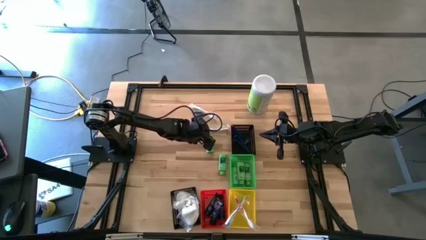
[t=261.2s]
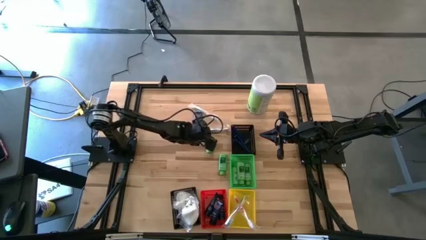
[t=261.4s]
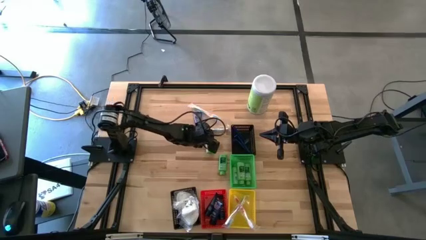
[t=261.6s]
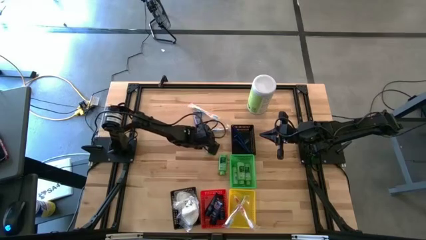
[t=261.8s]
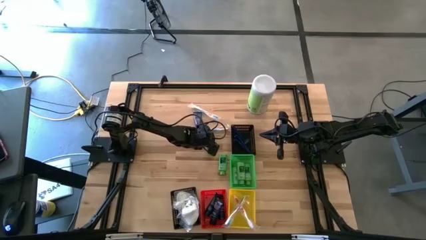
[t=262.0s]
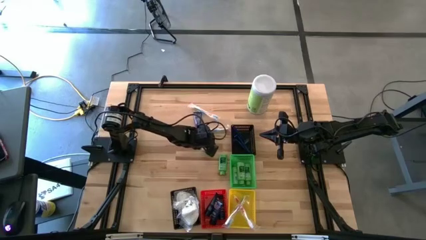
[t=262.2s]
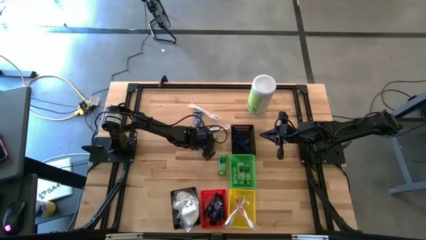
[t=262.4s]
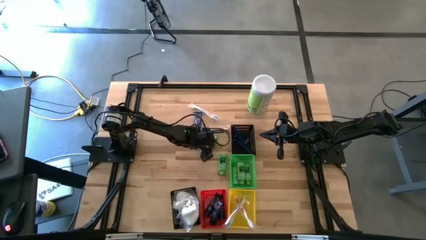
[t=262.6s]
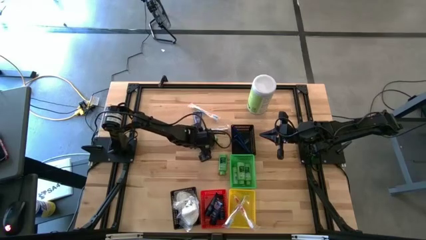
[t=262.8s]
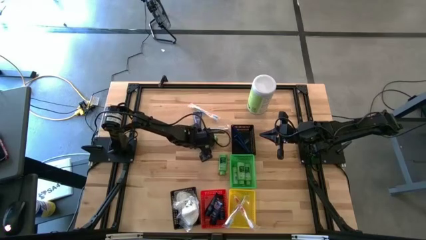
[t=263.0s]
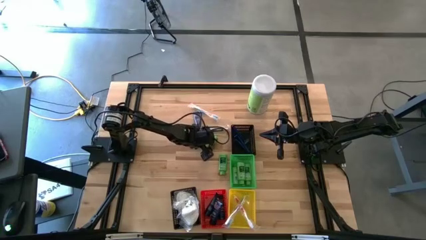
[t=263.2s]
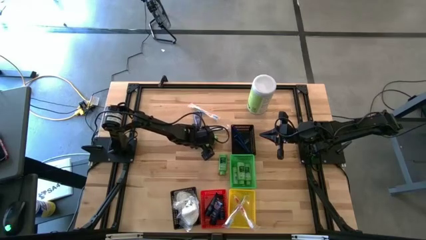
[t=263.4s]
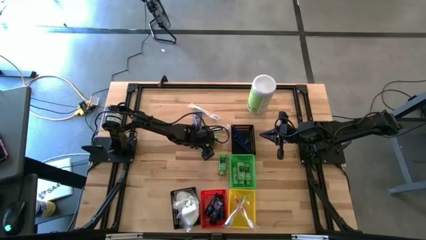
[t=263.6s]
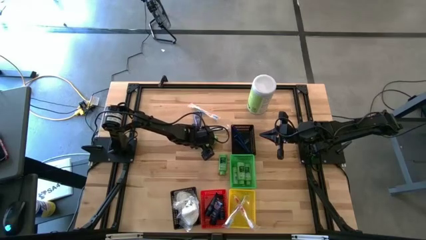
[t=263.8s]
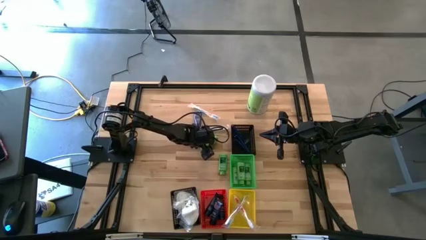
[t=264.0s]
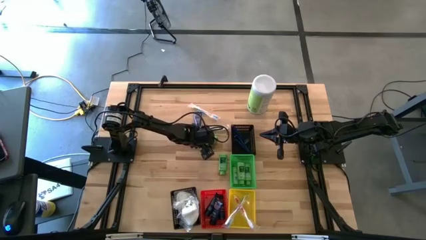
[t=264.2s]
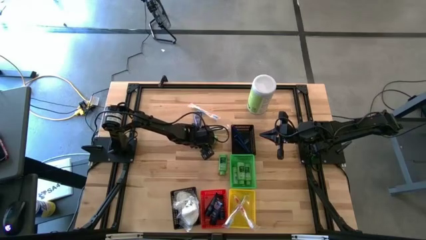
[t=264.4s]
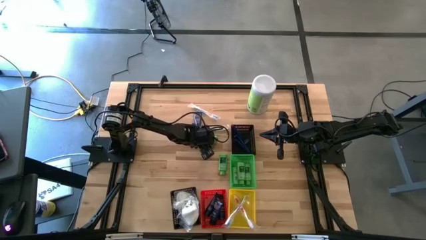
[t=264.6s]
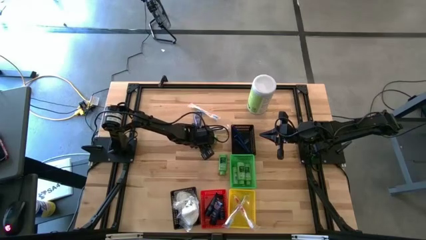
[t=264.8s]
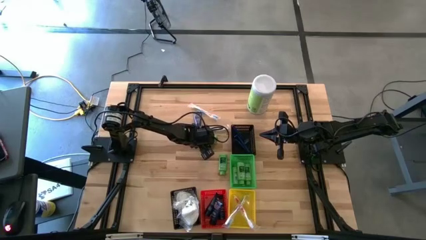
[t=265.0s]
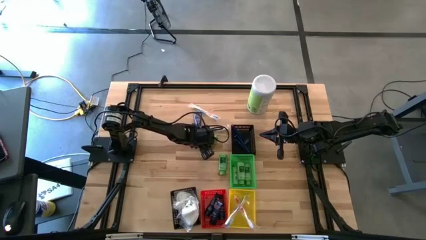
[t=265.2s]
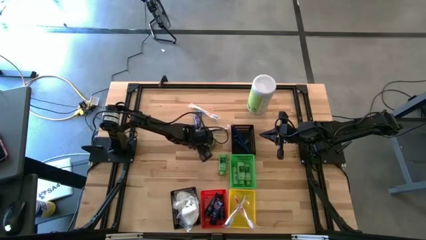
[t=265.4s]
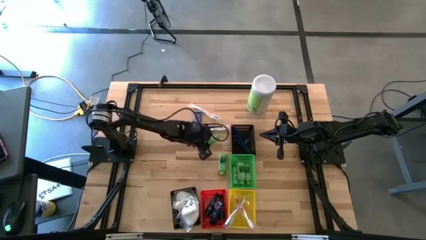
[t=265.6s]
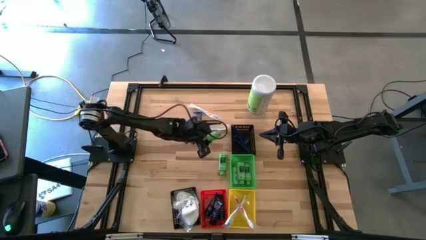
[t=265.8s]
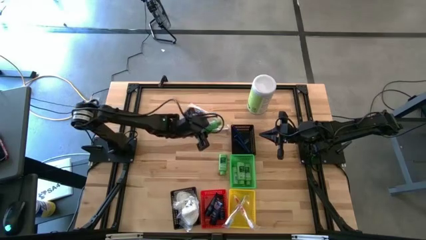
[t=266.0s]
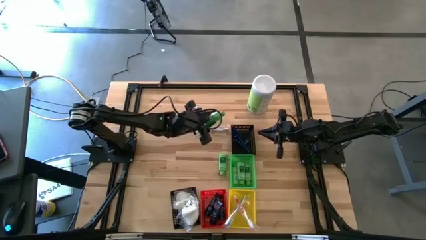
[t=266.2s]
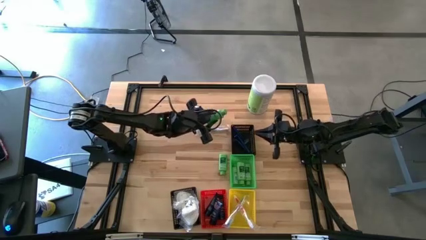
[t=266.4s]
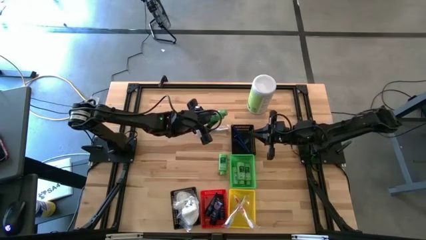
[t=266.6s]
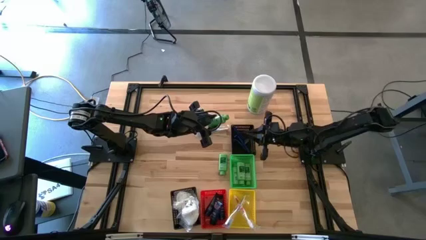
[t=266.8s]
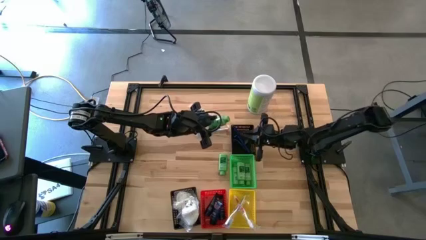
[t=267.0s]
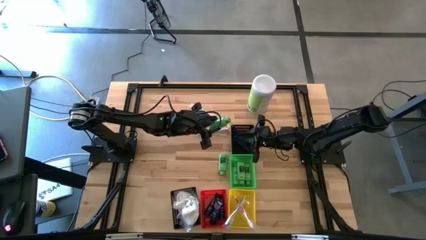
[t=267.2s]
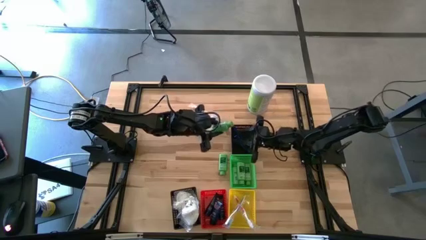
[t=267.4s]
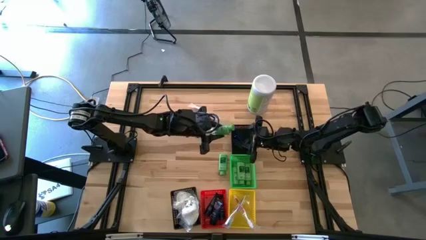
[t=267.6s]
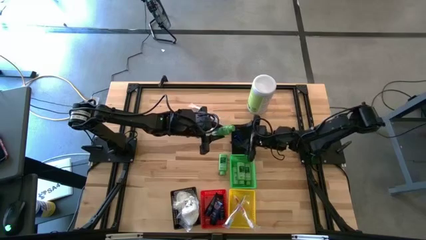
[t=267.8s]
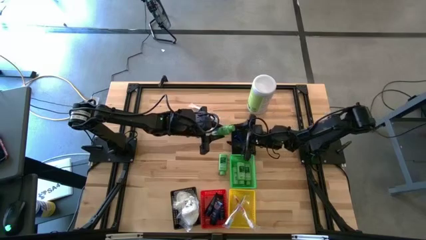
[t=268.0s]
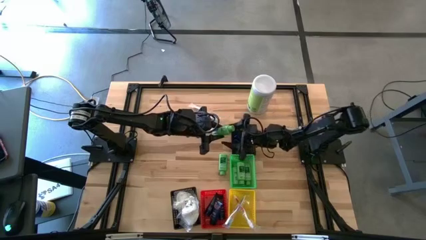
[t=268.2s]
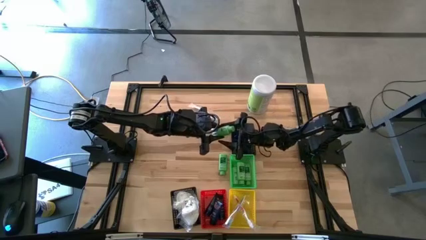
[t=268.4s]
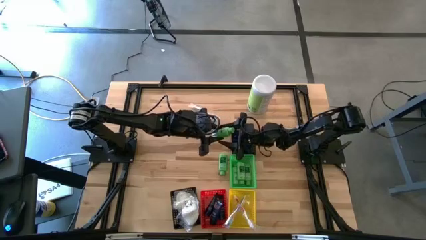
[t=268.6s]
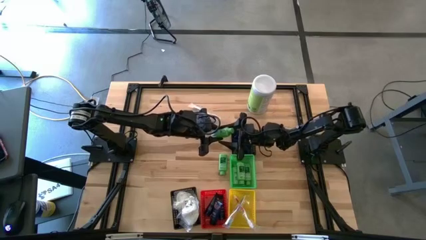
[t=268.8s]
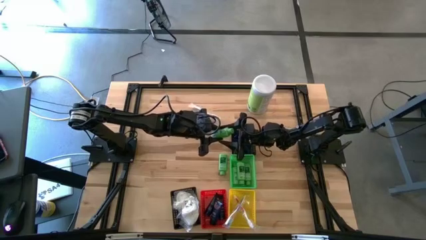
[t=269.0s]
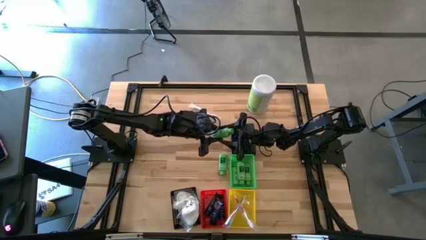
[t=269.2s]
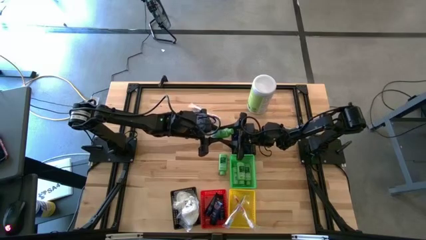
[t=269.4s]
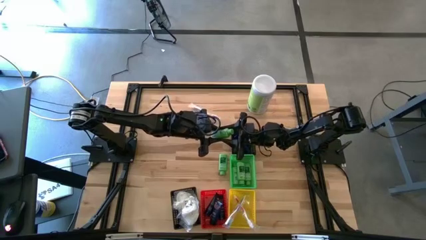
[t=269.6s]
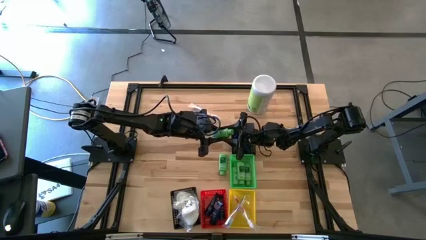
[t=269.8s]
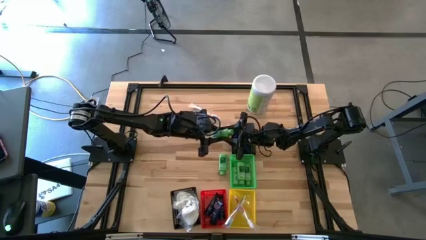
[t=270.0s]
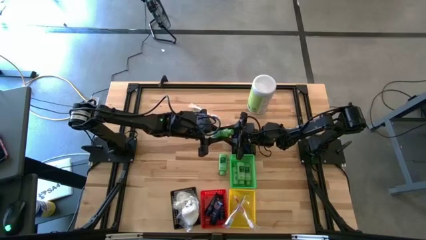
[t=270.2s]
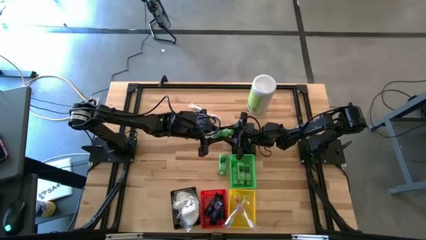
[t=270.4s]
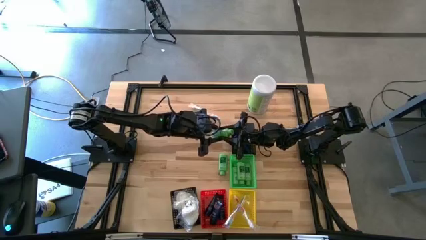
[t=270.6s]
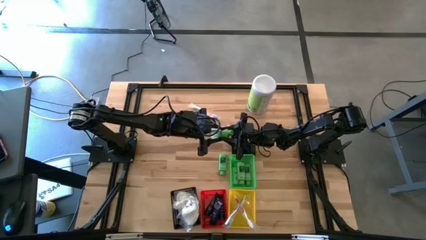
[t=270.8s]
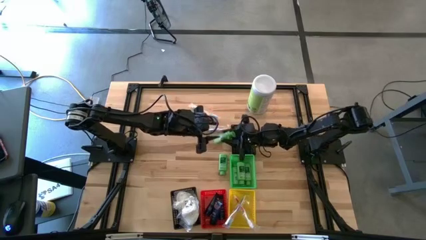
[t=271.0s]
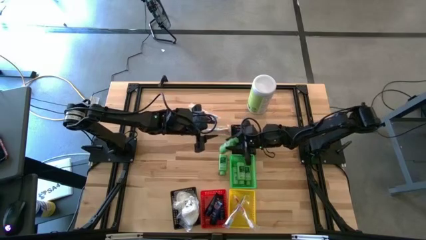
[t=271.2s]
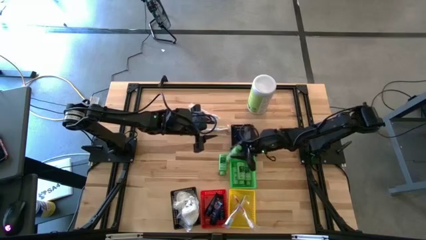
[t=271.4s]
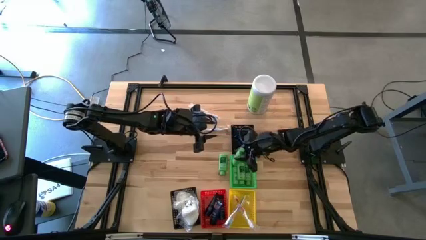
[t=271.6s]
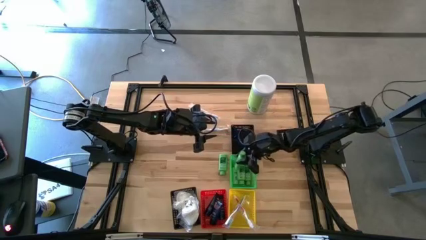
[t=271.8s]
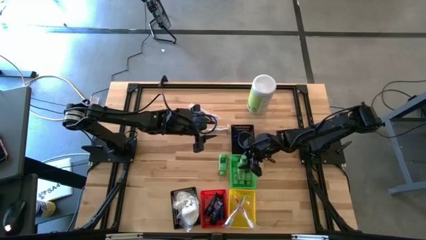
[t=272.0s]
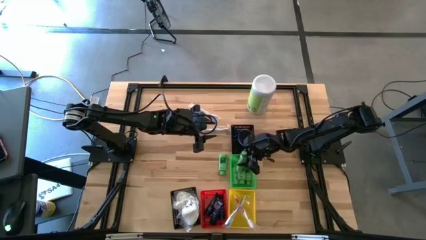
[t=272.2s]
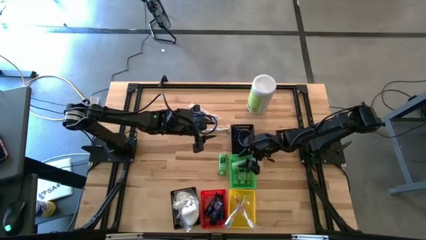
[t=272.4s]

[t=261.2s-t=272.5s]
Task: Pick & Place Travel size toiletries
Put the green shampoo into the green bin

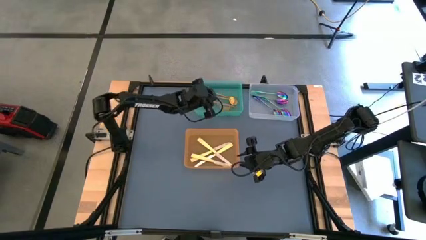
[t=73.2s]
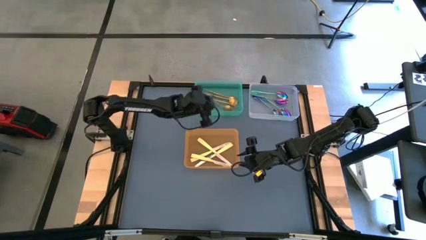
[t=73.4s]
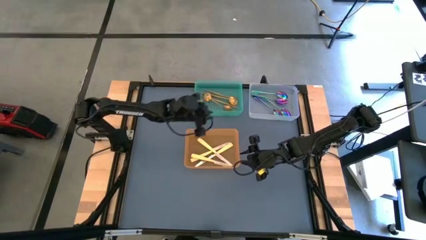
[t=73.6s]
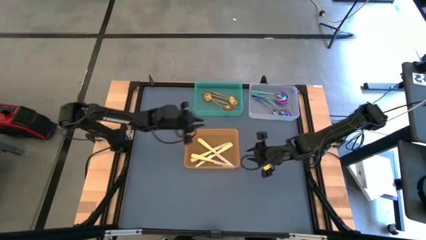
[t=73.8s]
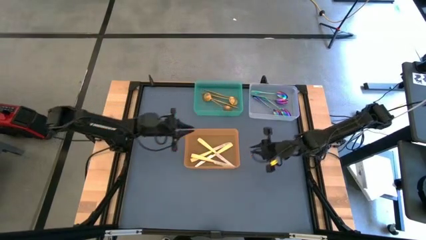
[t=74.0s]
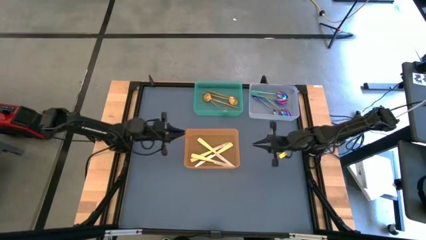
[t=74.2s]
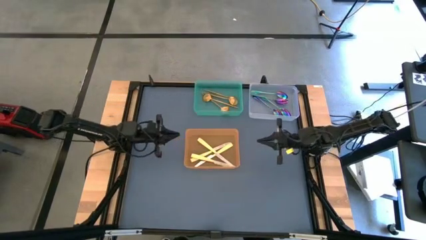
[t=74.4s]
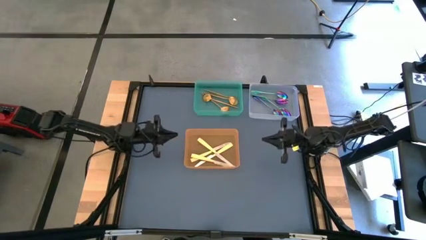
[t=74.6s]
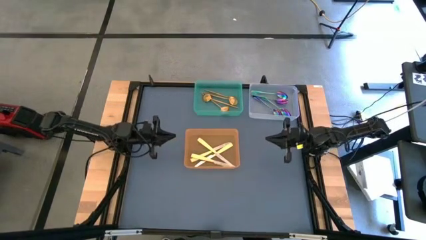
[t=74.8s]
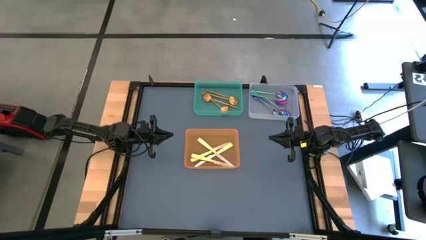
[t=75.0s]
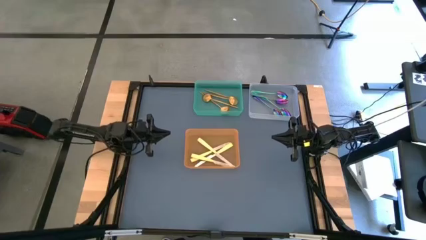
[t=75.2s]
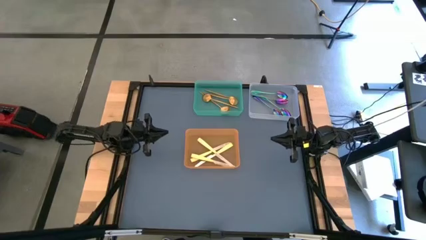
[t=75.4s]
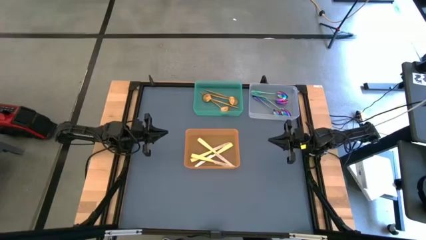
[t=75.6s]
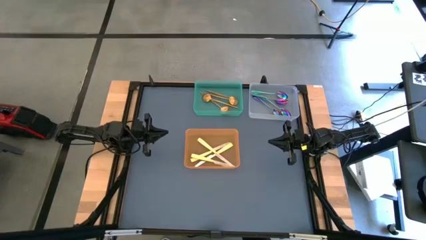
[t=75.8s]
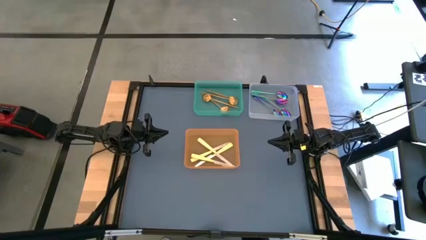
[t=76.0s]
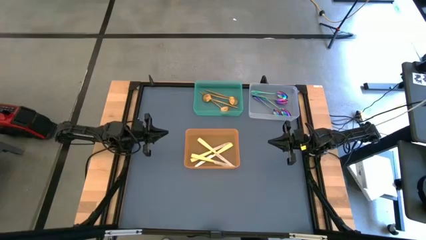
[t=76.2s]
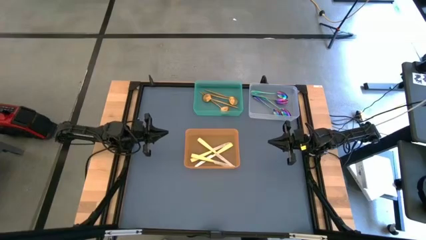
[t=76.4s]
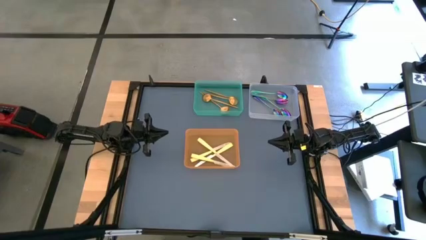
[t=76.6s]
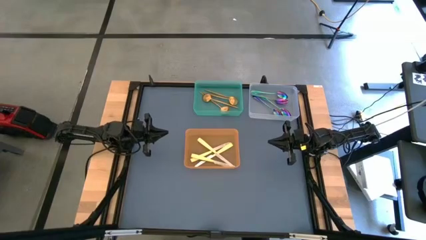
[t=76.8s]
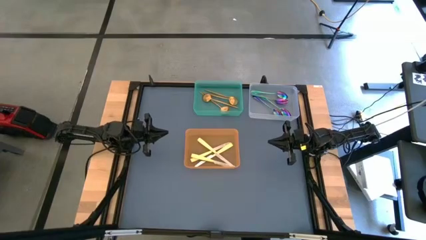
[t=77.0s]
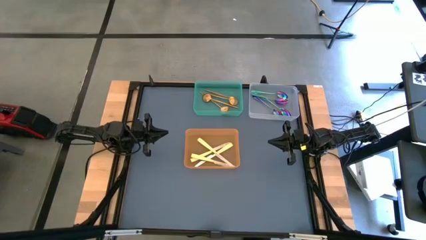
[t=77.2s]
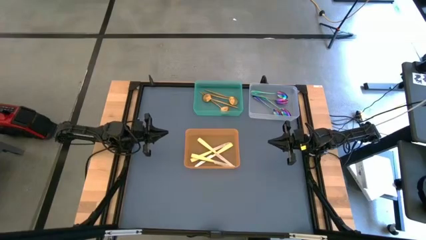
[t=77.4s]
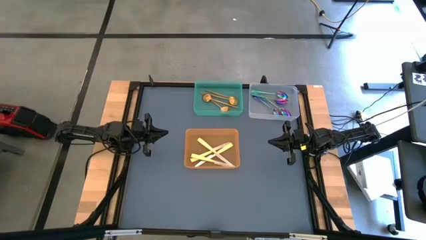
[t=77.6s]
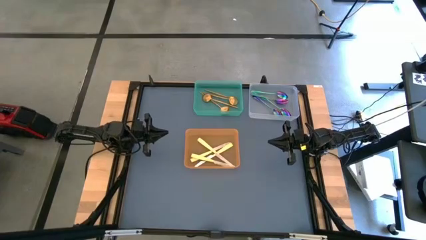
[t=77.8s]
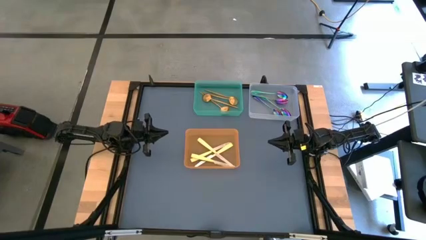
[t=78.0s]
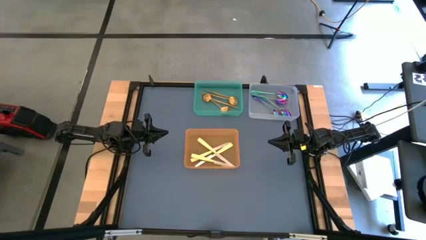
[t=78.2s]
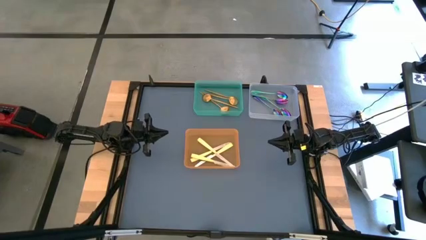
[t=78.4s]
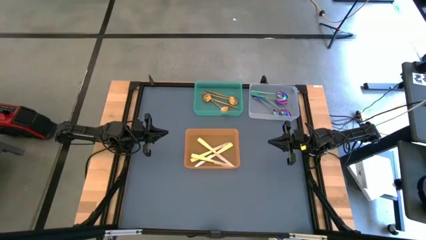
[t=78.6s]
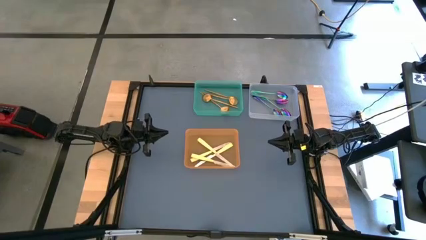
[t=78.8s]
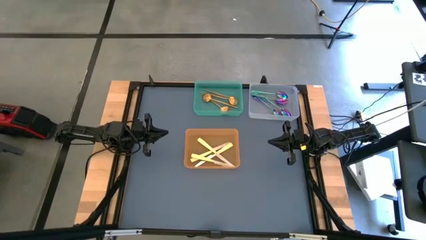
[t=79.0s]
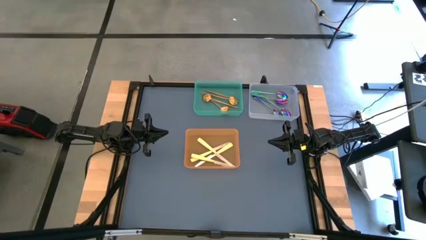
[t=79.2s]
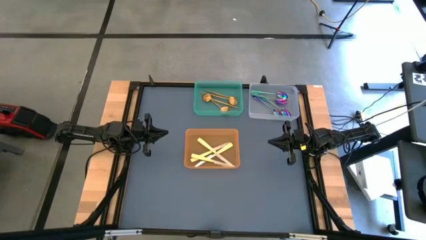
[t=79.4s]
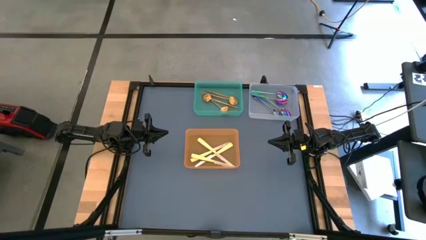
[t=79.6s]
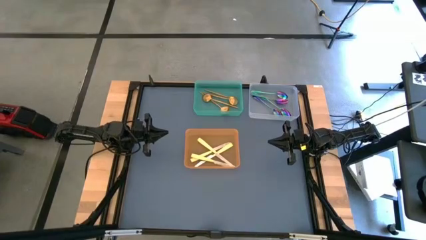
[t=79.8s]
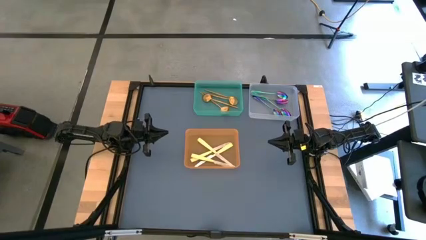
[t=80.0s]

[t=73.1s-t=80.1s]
Task: Sort silverware by color (type)
Return to Home Position
